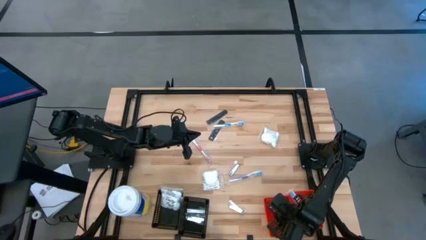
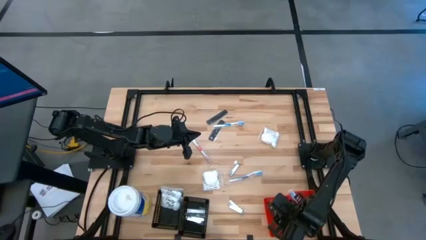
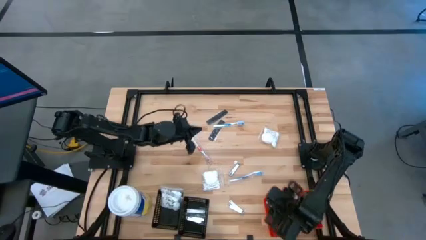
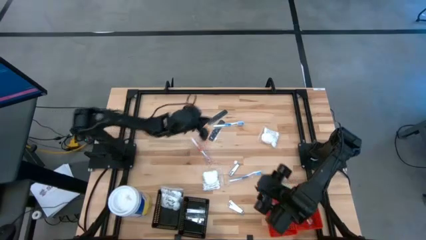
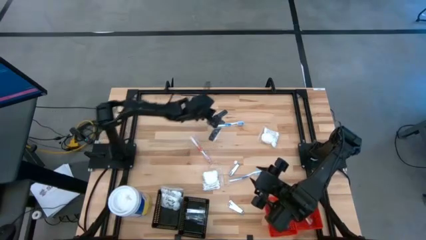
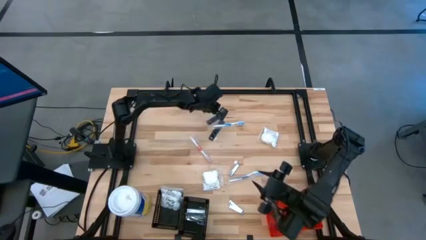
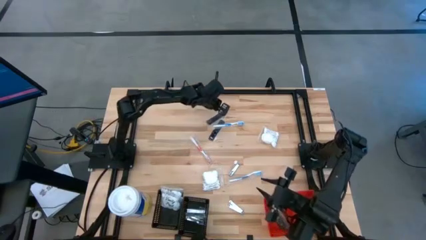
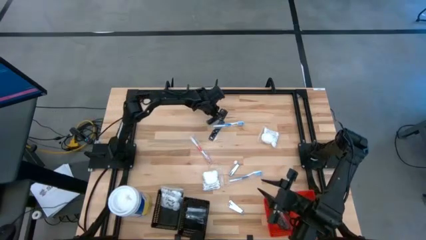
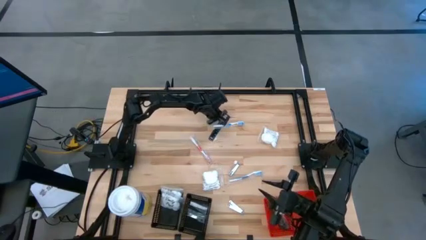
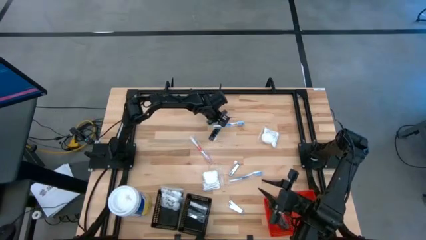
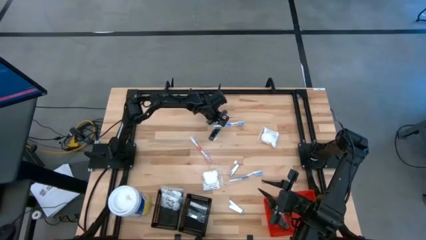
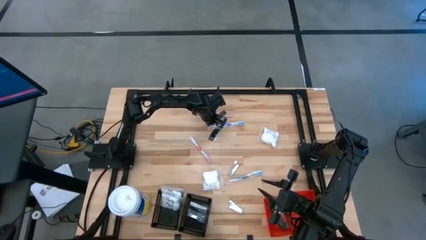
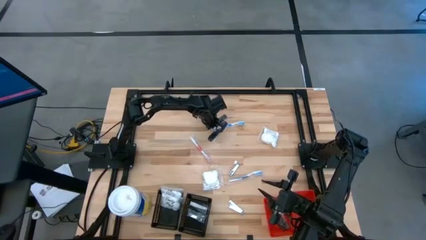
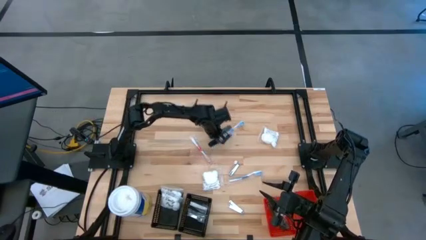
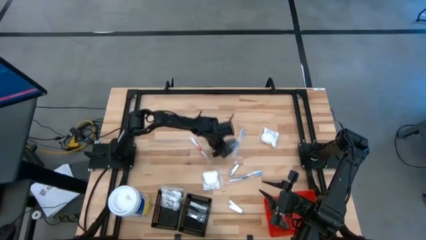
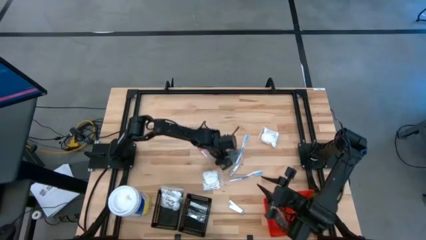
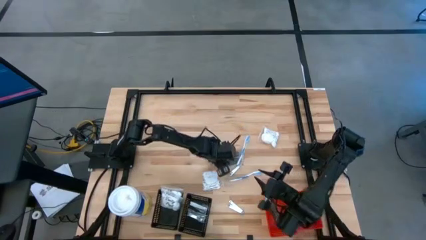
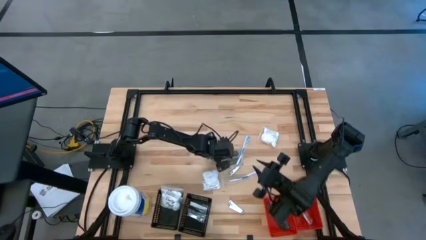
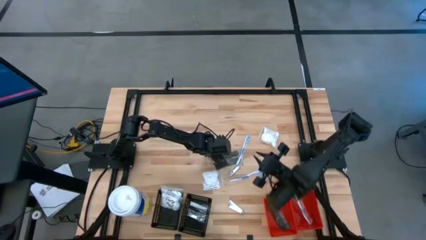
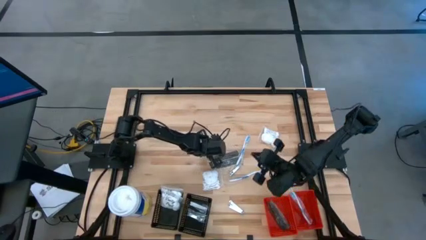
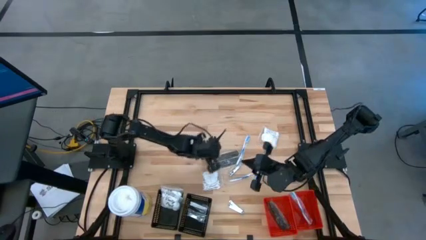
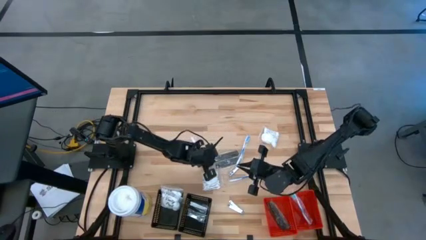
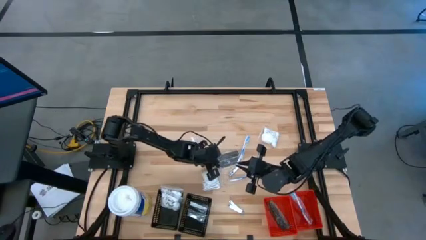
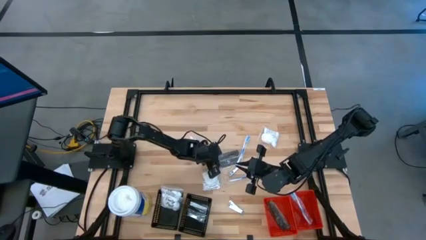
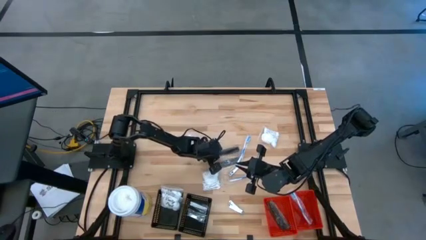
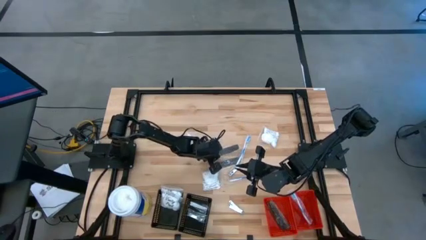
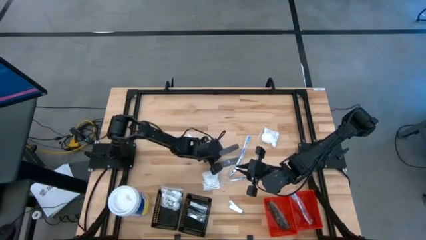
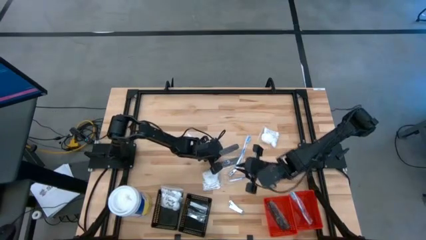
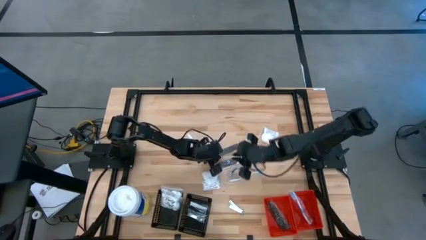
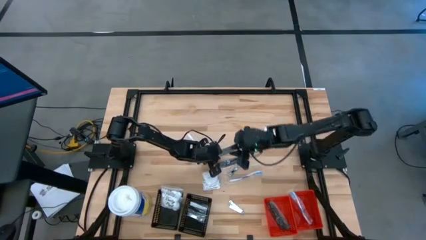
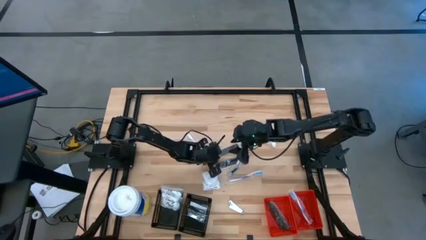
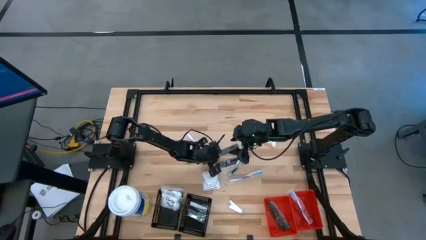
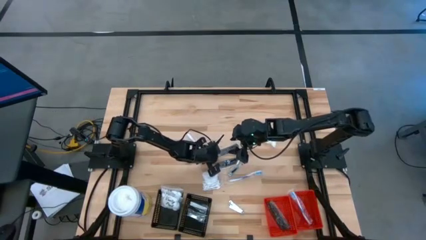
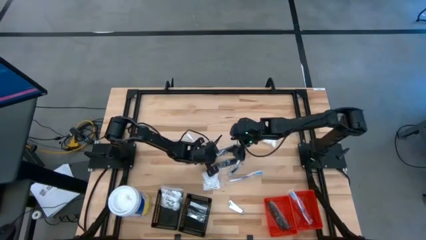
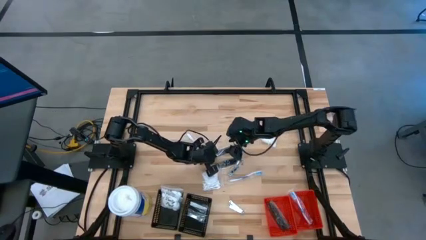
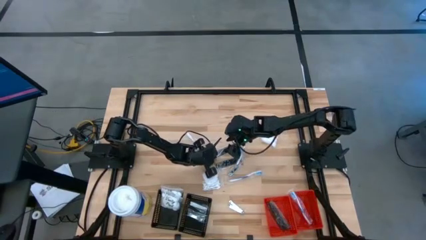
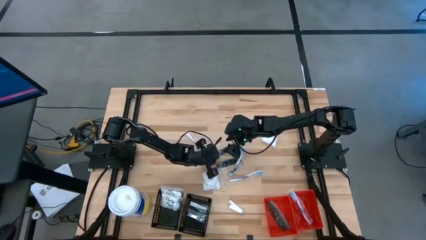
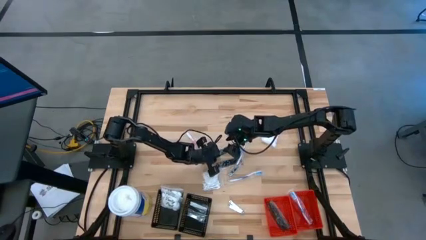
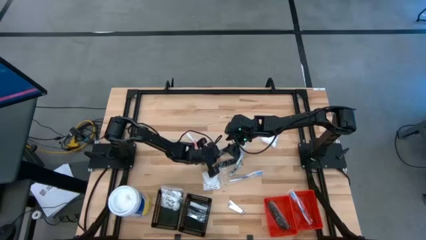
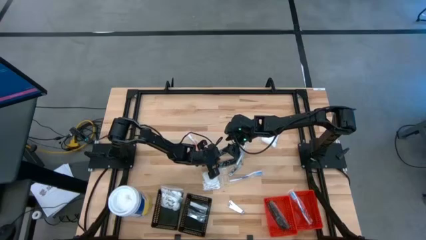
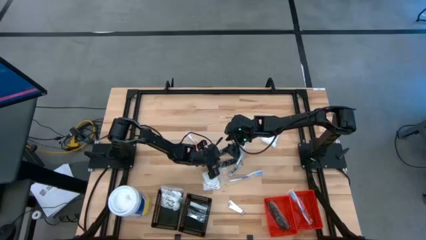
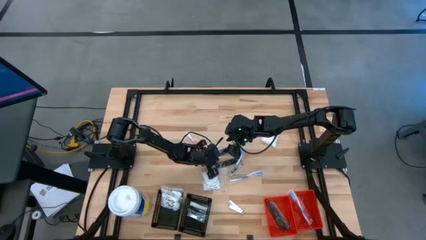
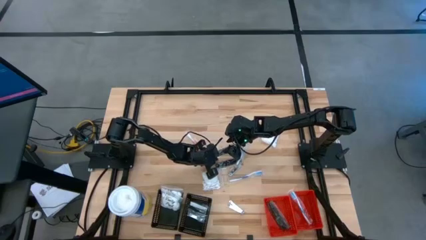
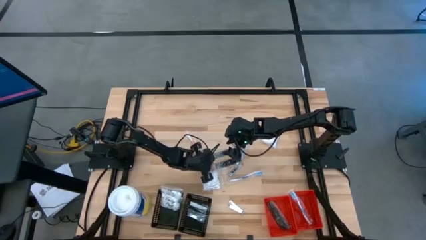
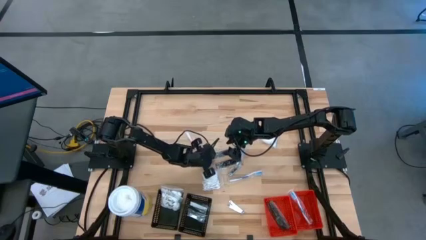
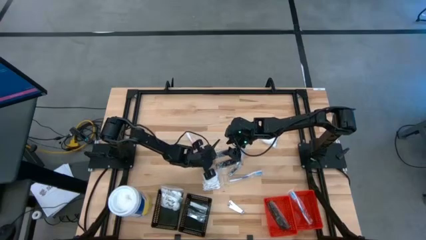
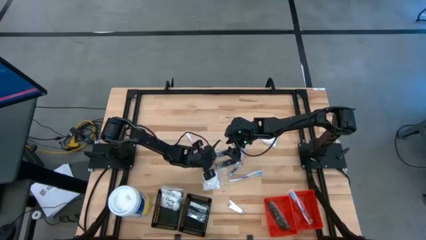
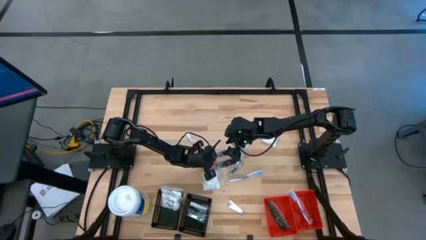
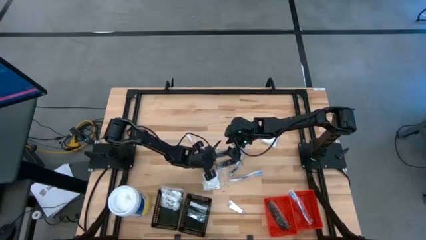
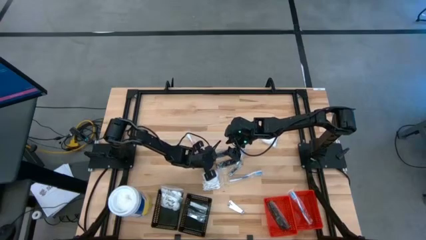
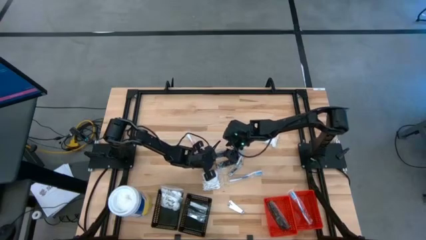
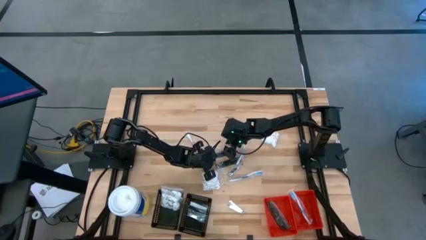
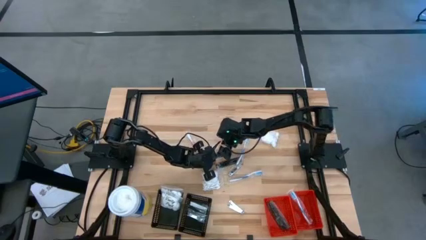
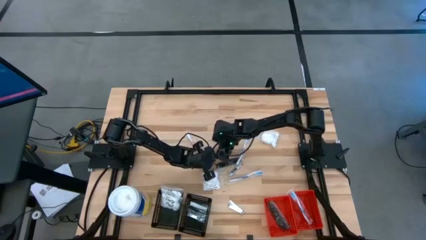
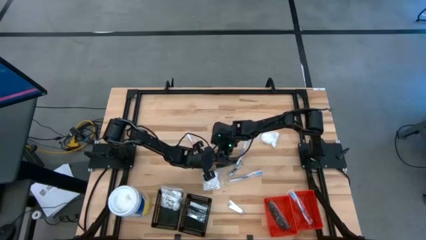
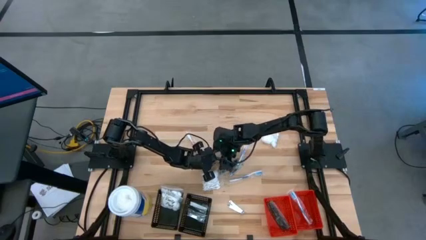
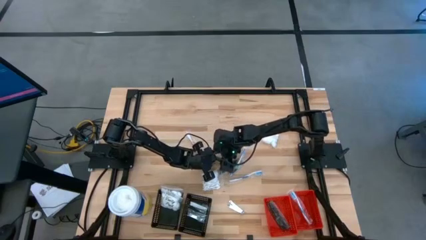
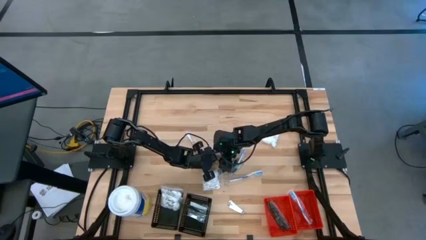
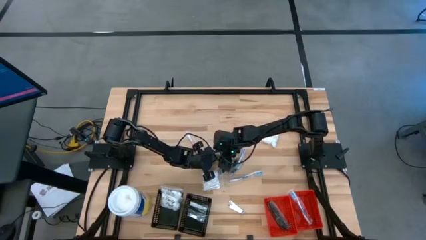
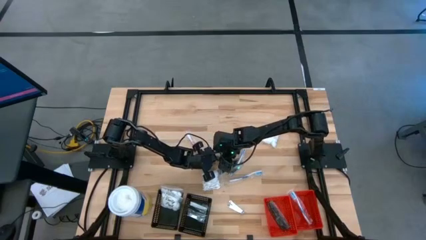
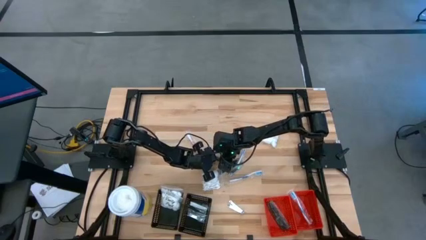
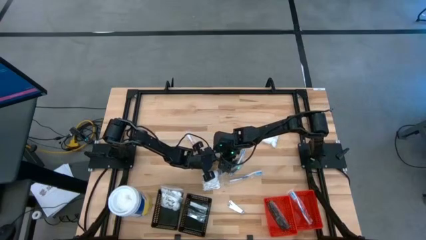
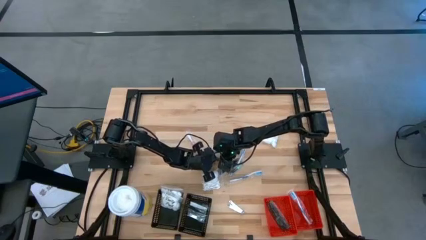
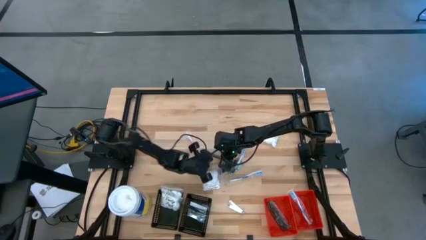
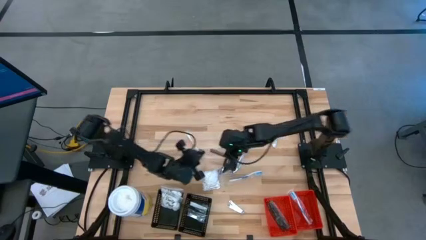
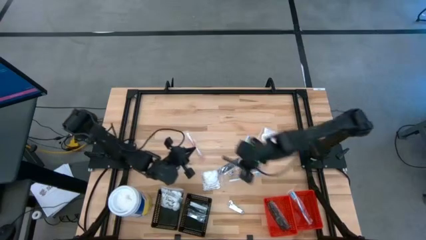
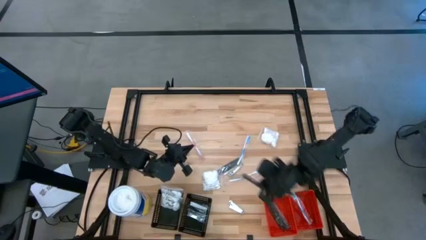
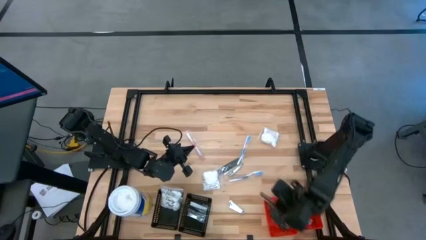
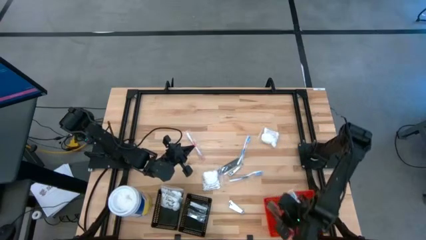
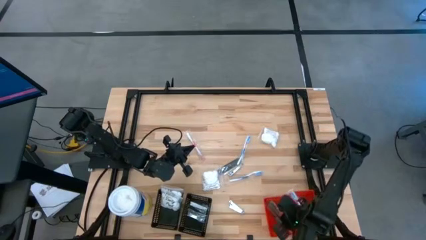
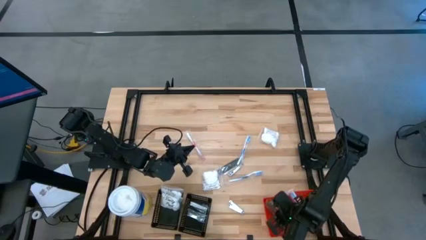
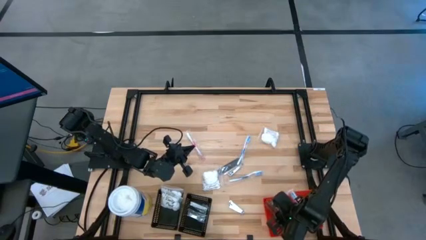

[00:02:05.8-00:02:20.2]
Task: Pick & Place Travel size toiletries
Put the black hair comb into the left red bin
